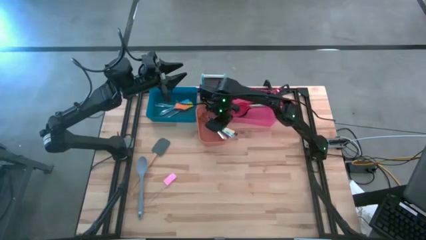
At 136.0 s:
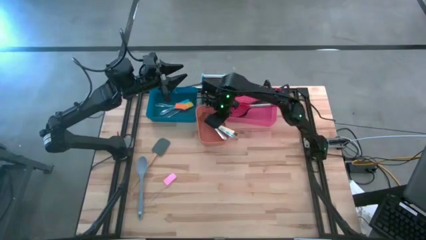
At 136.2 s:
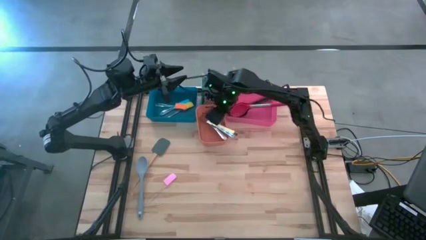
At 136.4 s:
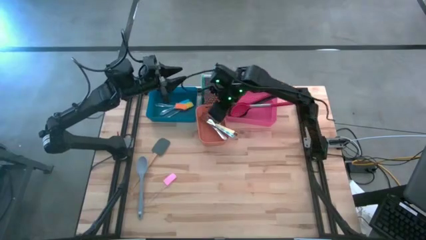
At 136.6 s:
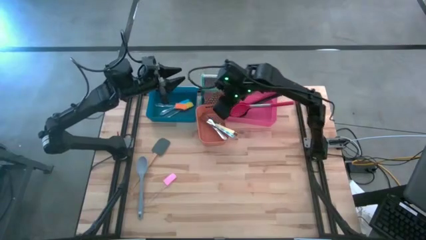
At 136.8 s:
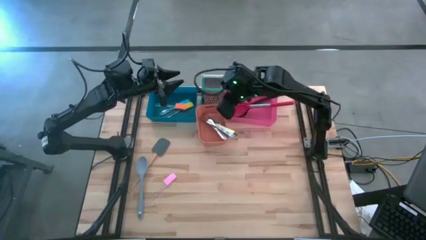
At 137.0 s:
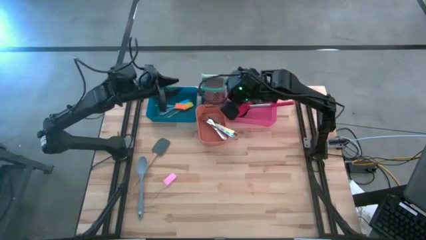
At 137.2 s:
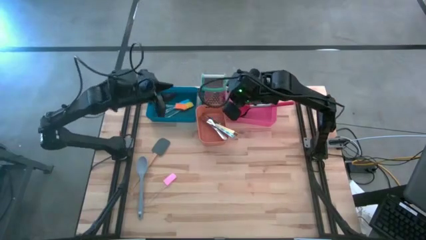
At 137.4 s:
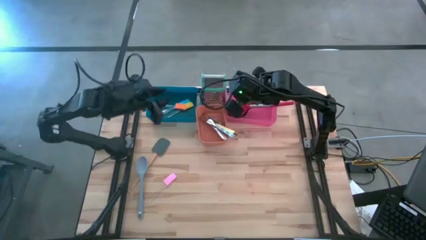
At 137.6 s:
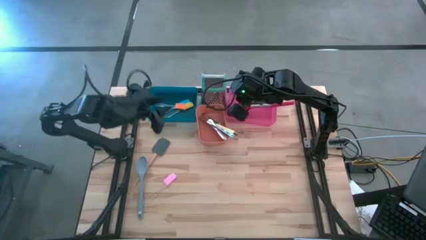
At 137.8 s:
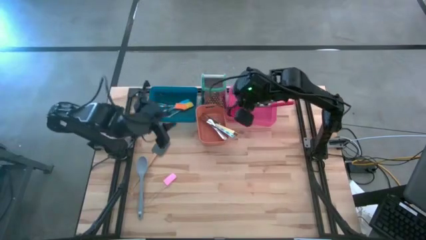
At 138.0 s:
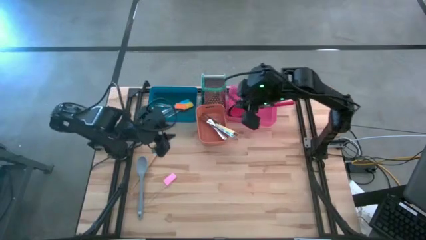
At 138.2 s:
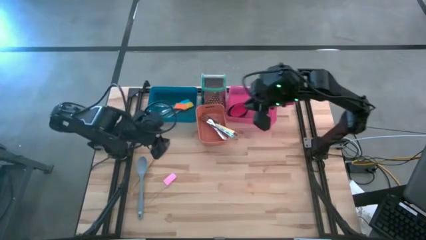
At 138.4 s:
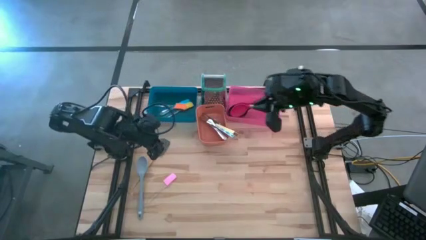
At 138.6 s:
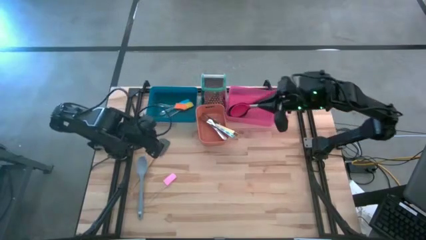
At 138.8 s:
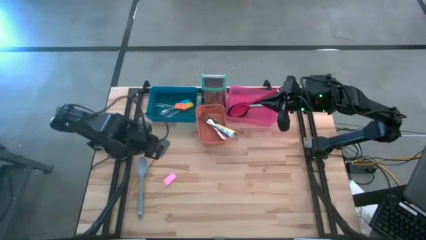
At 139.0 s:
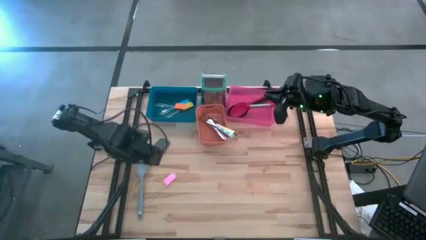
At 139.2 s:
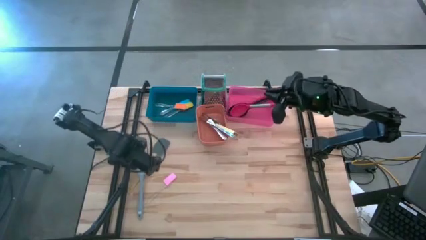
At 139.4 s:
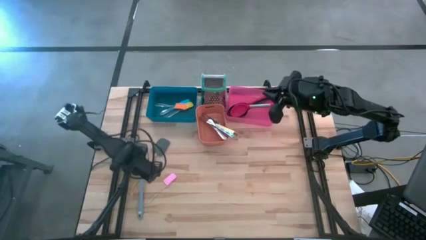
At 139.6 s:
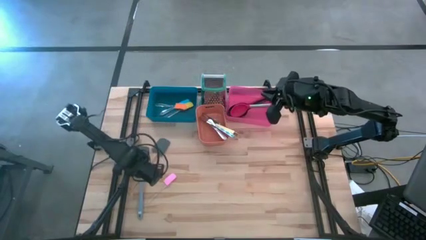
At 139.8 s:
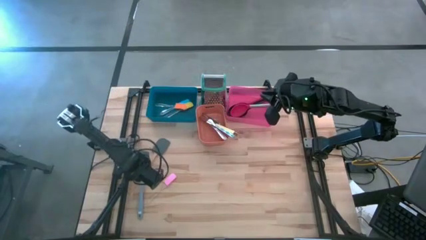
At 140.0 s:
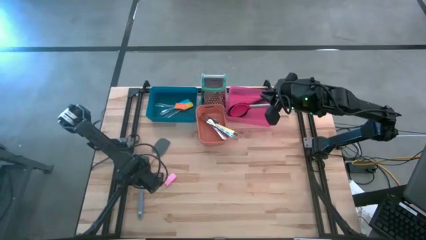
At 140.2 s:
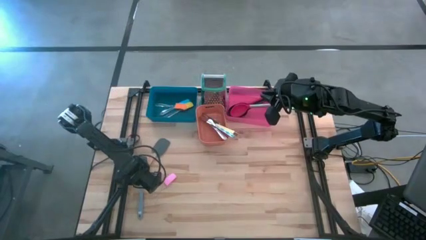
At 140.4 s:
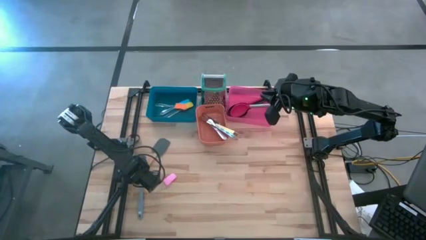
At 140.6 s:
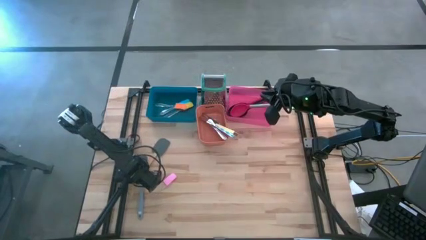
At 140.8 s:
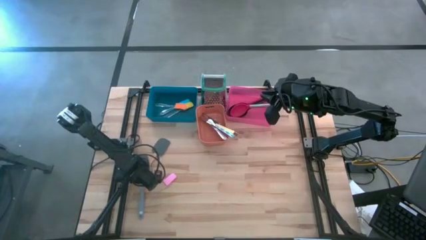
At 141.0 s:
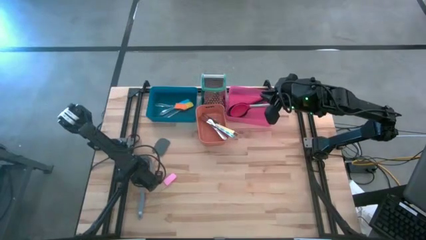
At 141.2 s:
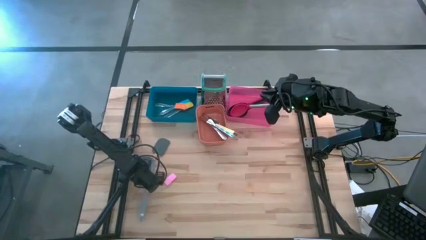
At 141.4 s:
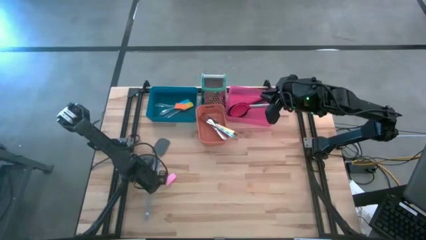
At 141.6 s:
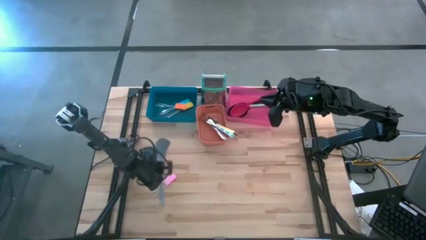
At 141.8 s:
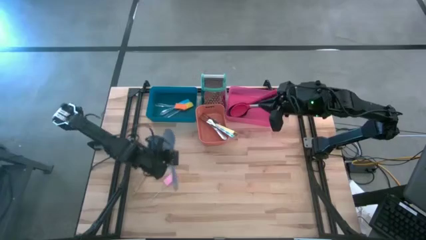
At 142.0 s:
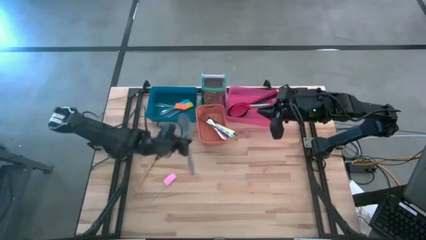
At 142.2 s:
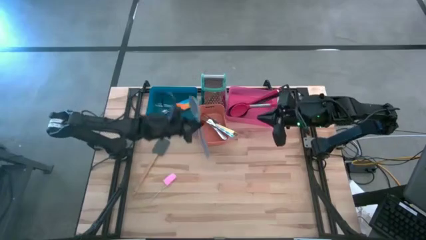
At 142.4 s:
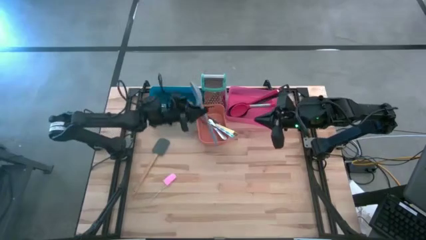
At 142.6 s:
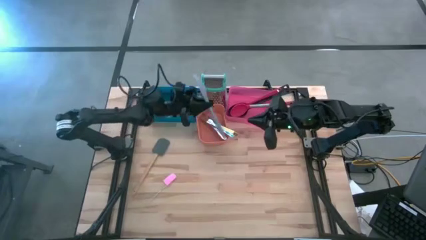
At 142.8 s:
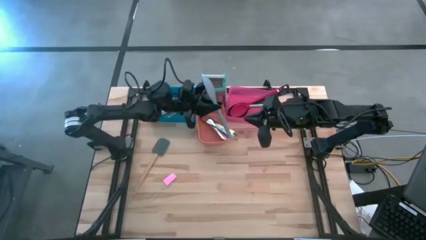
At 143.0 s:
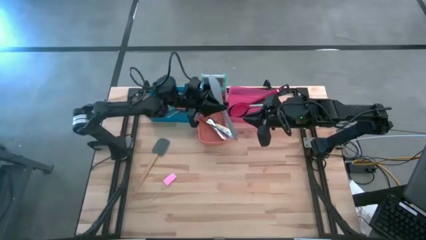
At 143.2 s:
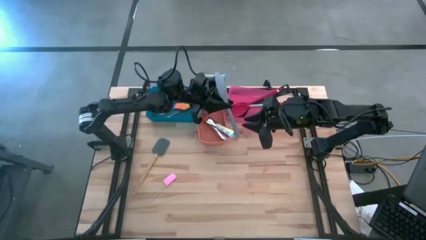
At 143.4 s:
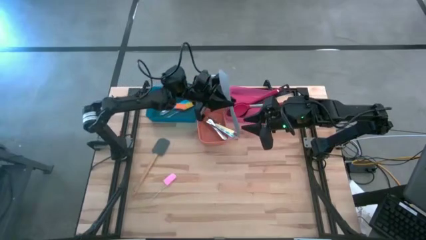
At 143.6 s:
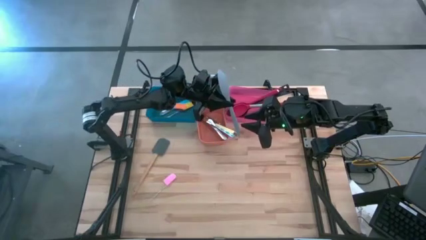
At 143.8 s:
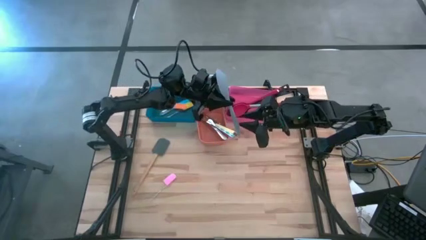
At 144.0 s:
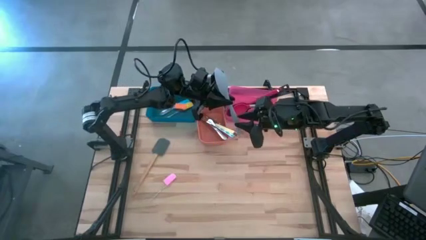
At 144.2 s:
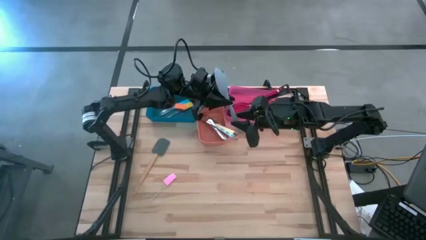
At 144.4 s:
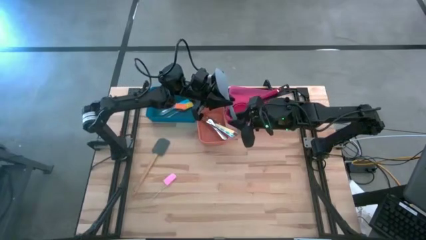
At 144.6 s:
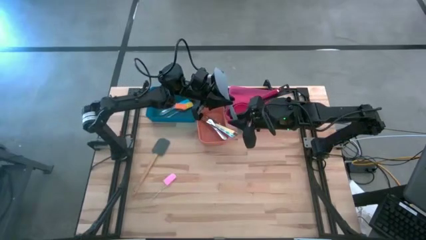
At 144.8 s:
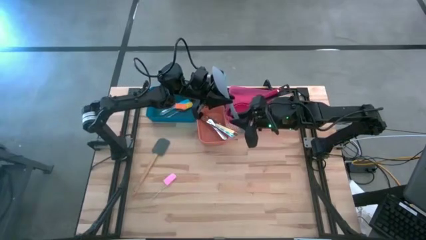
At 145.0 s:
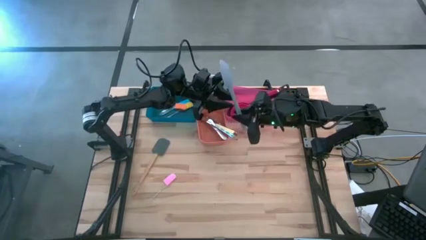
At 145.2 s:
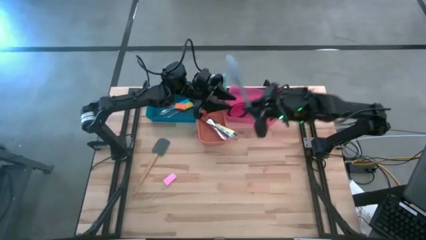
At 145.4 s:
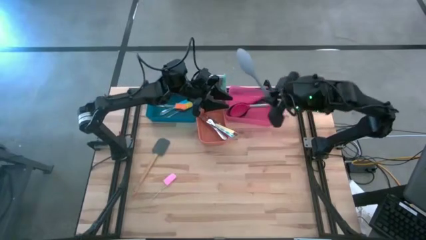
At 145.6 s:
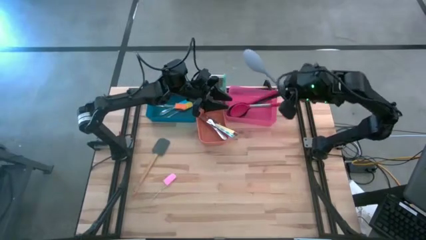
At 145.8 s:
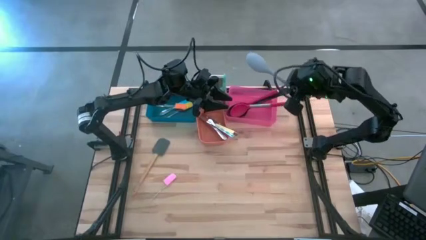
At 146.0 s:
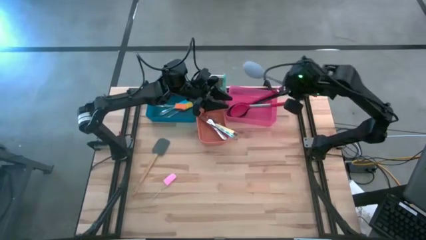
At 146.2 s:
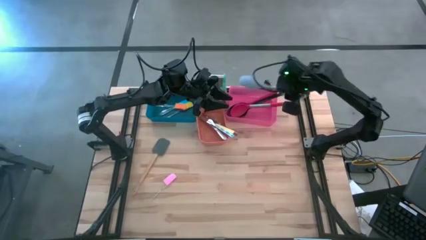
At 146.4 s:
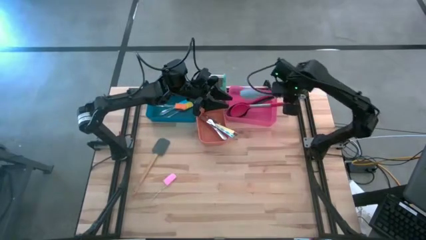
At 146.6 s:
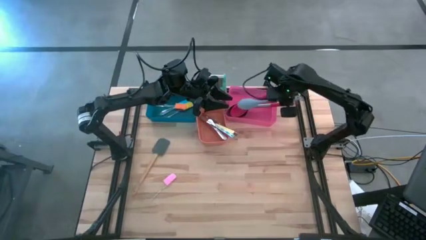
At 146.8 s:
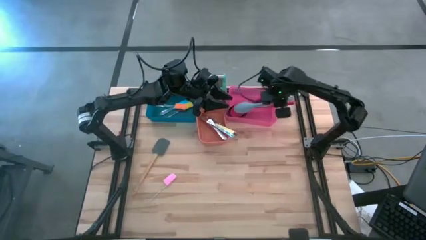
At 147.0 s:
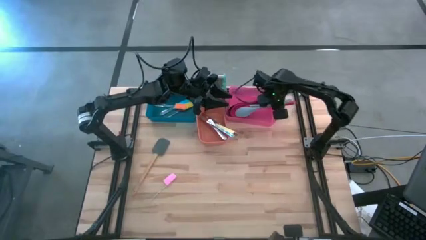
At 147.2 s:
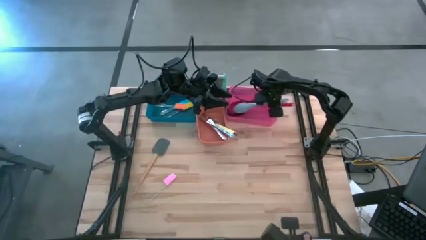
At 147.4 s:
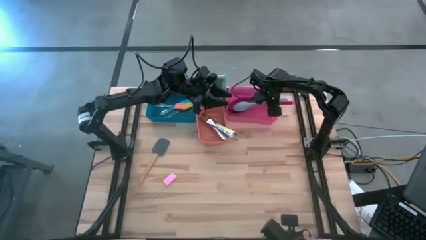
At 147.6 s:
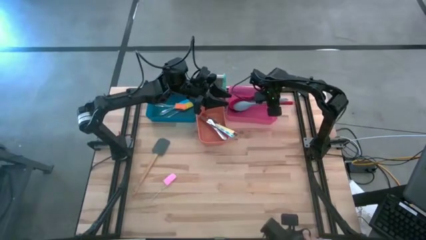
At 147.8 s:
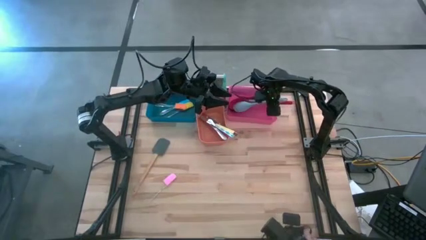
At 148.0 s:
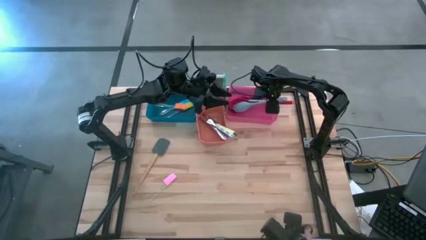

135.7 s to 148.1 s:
Task: Pick & Place Kitchen Items
Put the gray serving spoon into the pink bin
